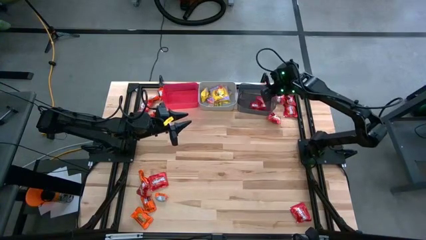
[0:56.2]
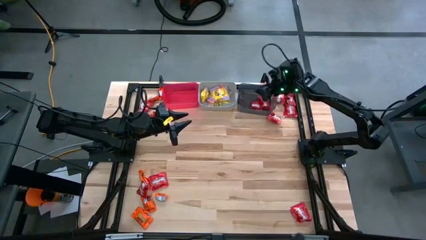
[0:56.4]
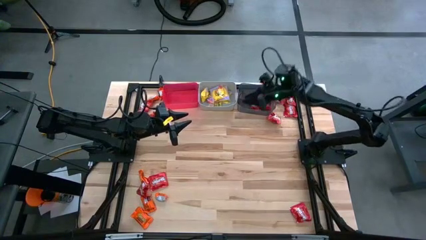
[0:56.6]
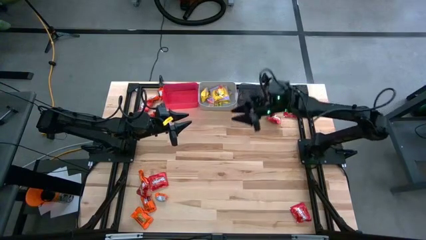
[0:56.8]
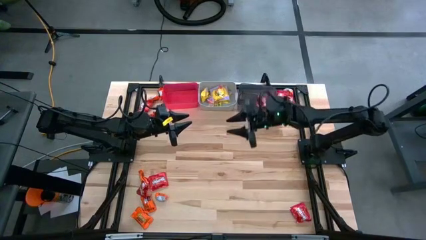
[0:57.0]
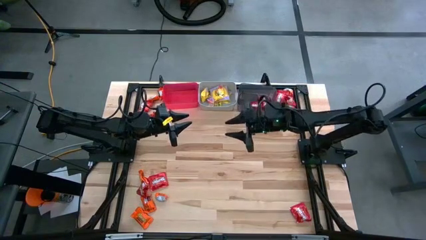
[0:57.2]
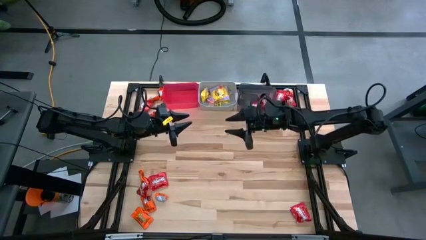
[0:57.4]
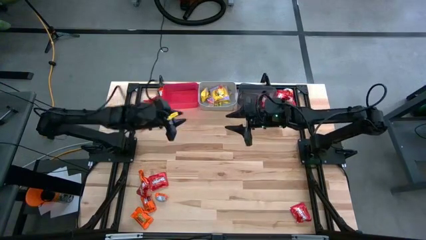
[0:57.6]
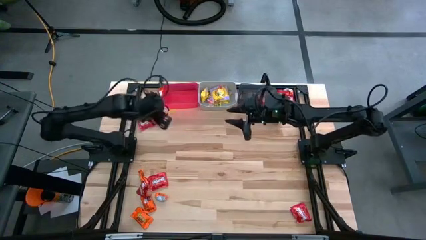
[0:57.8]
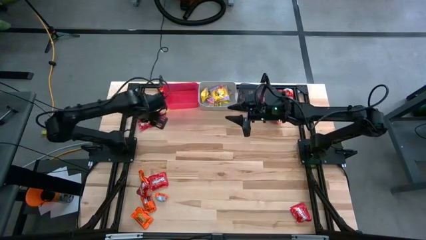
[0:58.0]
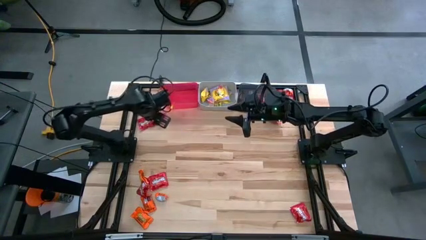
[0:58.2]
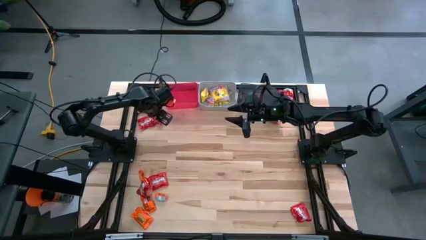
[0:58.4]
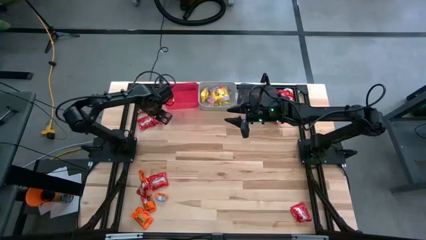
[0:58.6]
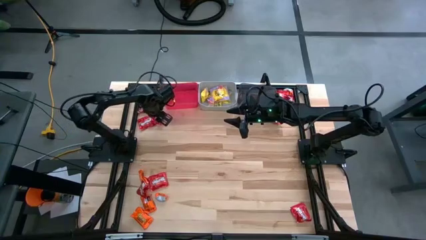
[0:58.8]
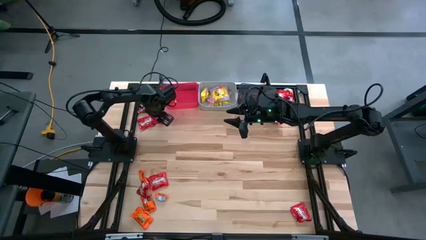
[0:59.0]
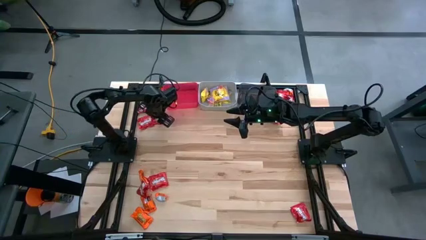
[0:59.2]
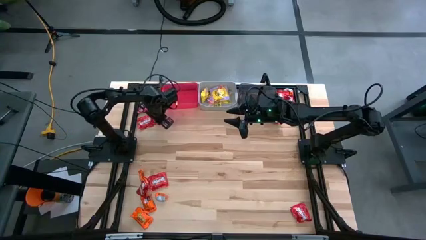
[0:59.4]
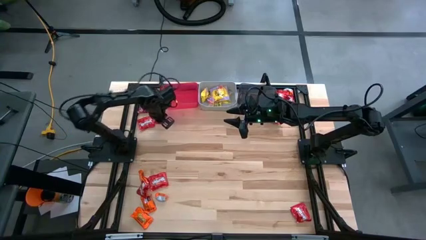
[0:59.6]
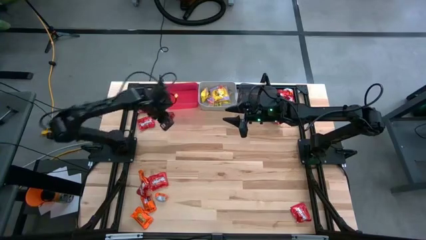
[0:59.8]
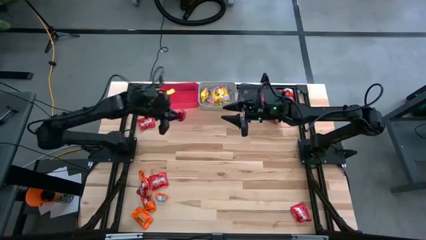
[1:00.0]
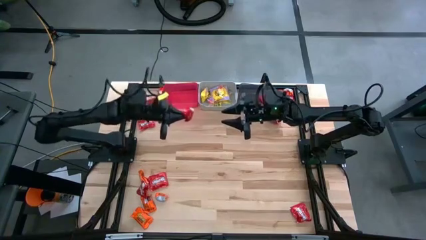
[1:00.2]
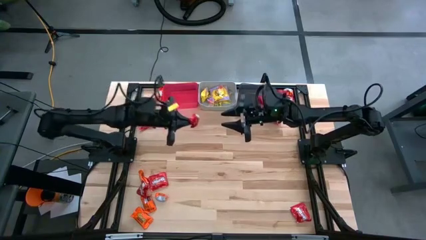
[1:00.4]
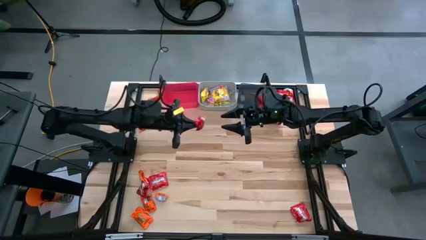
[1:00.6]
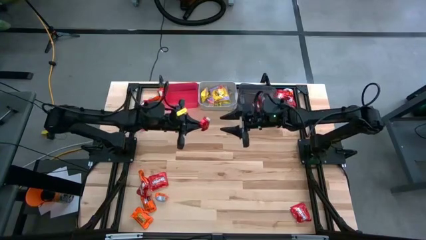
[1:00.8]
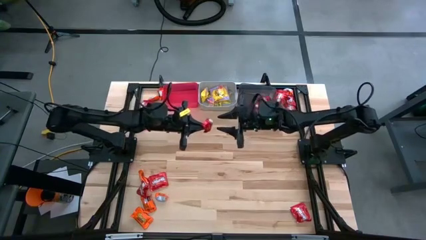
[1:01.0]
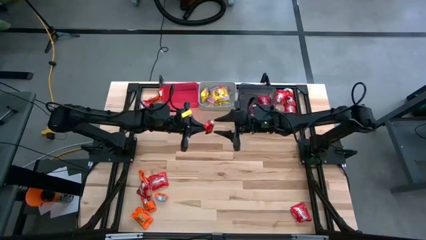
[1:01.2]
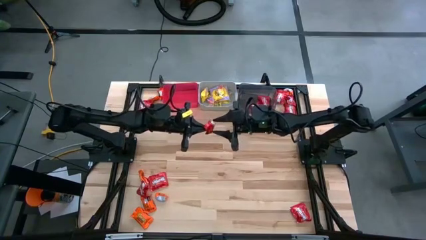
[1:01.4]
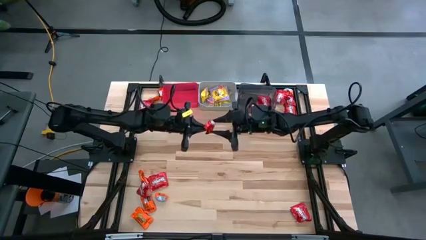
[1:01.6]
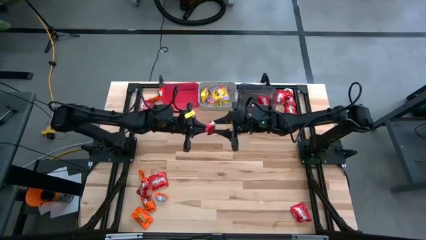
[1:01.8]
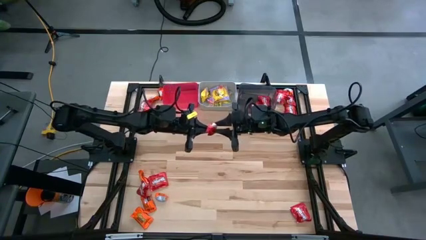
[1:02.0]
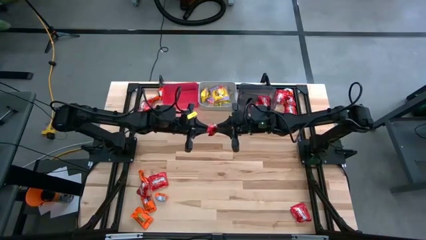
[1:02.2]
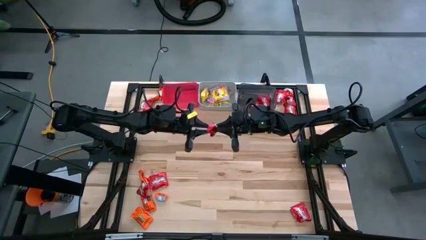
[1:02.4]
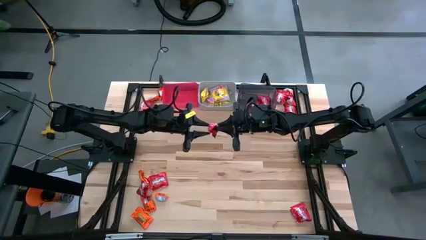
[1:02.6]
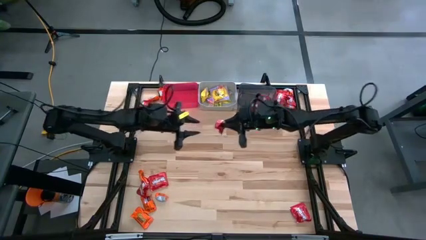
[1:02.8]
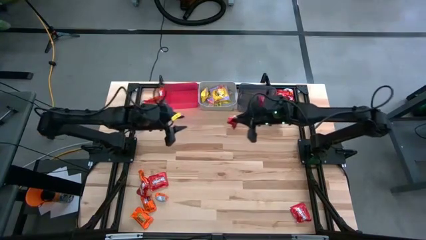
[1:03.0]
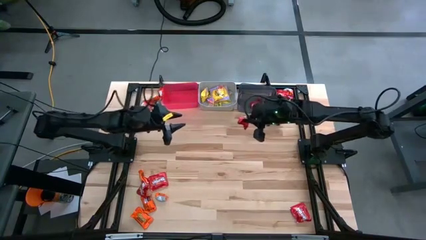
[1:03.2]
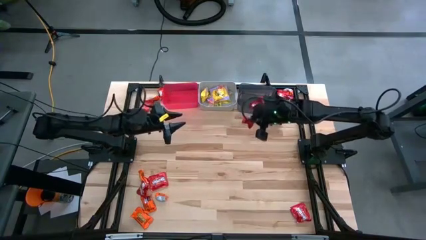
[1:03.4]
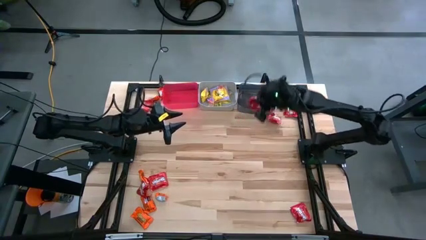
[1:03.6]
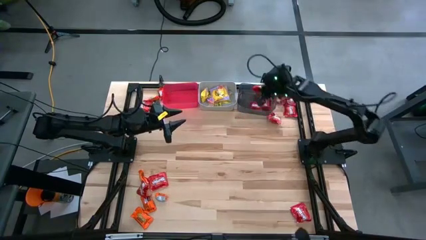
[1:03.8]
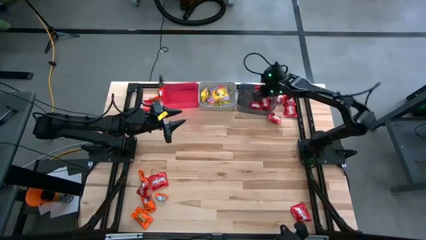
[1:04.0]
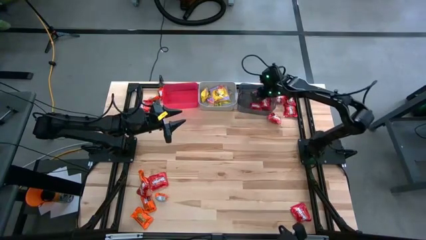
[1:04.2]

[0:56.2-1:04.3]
Task: Sort candy
Put the red candy into the black bin

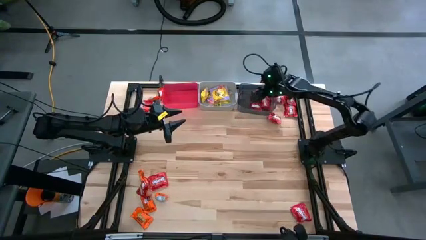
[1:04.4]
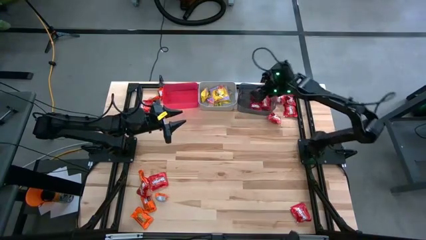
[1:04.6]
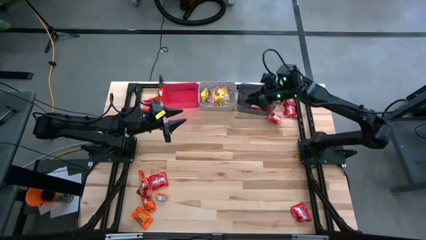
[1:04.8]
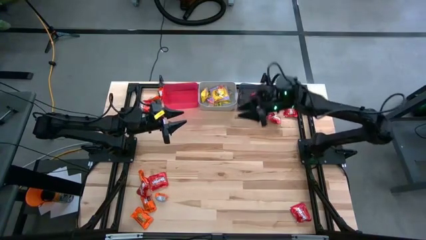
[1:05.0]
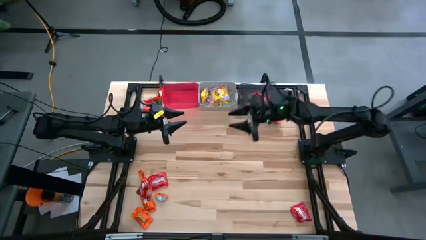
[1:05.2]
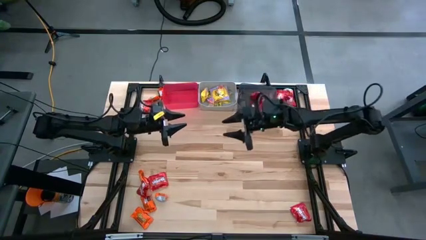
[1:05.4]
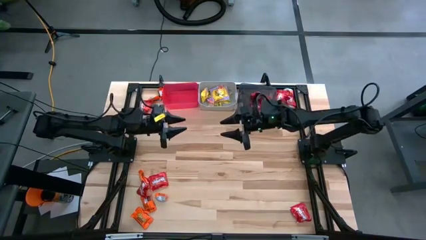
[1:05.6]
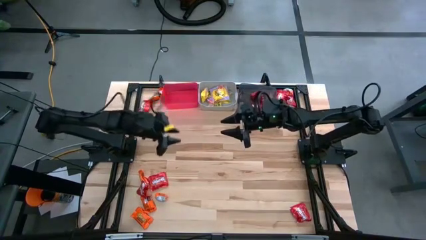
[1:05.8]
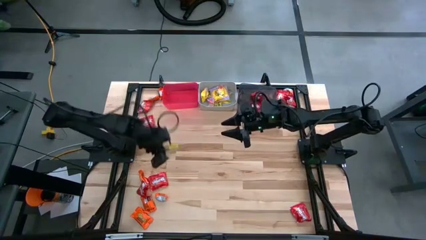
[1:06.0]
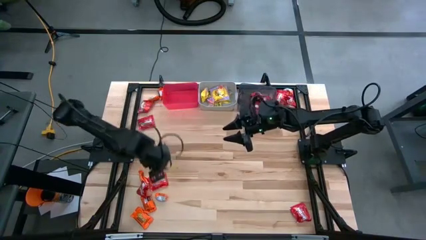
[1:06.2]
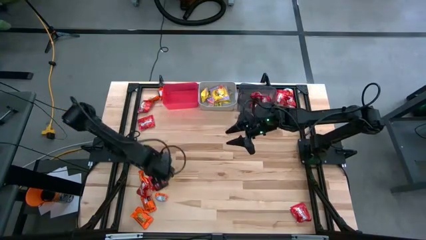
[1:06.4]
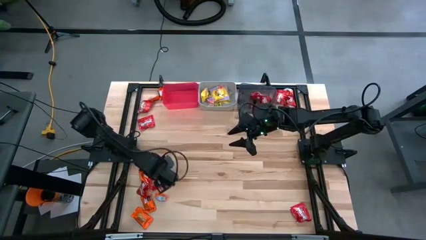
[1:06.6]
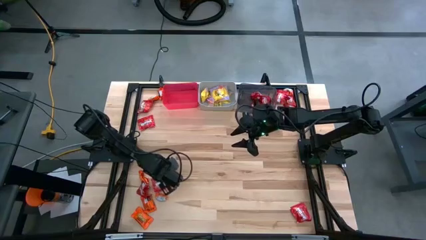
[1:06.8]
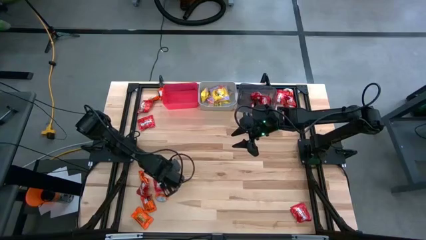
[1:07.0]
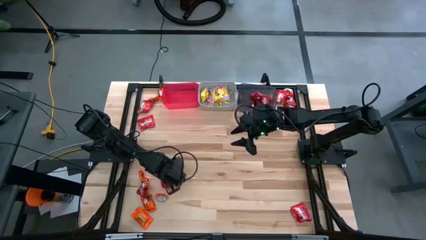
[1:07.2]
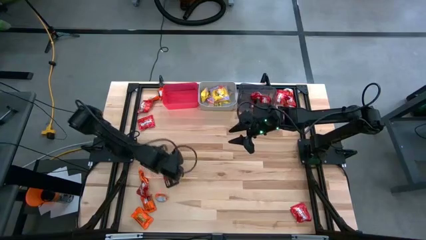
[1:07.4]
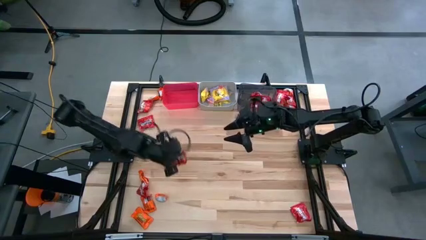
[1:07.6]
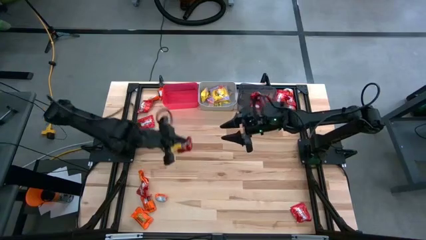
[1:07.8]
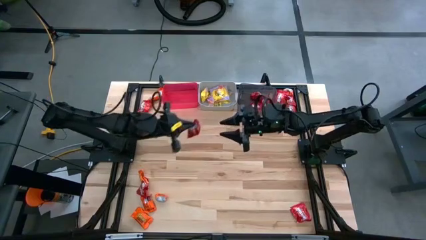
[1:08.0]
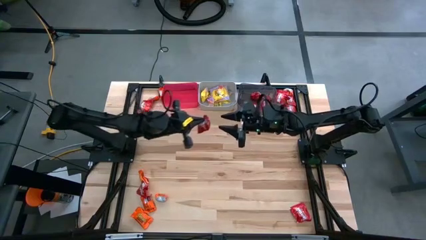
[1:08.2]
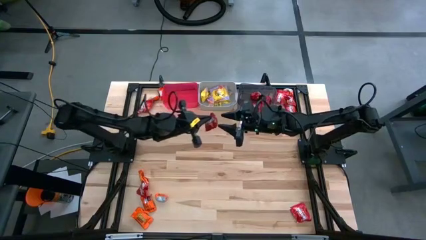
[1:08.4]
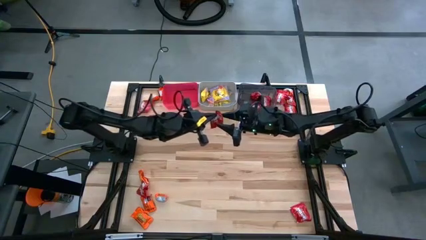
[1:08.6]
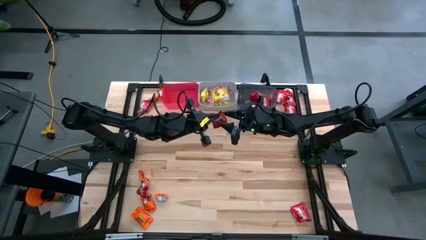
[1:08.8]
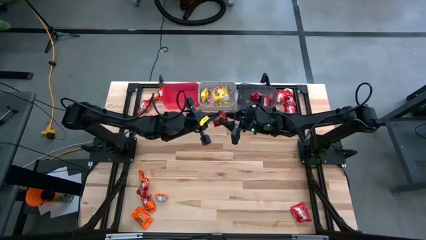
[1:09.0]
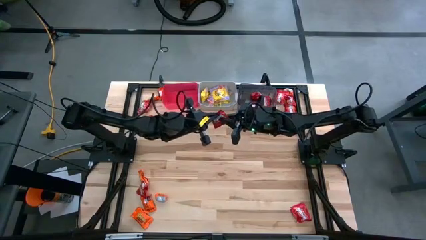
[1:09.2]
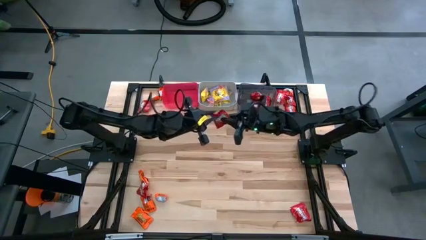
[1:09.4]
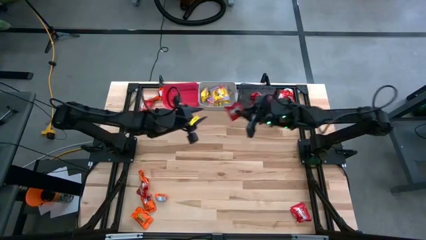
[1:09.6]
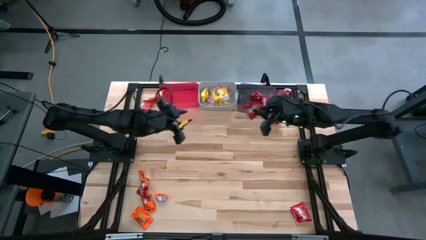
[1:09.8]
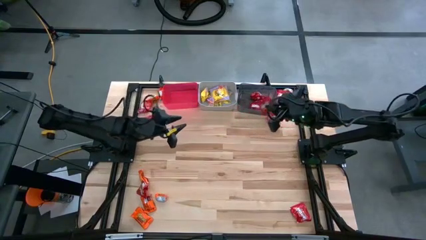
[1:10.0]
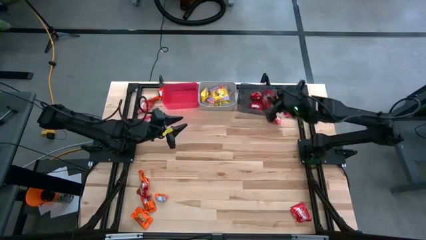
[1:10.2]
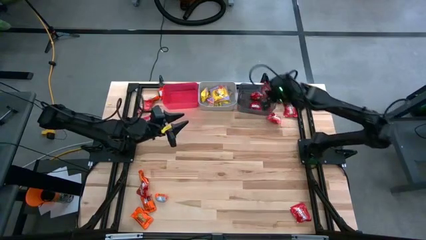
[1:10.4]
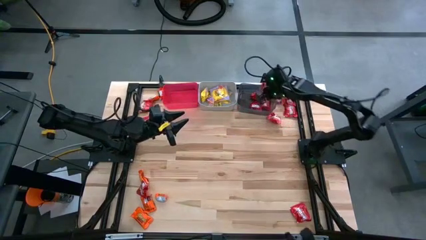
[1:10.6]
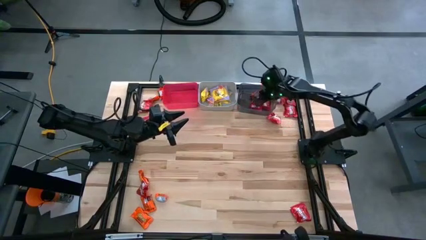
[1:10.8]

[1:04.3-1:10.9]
Put the red candy into the black bin

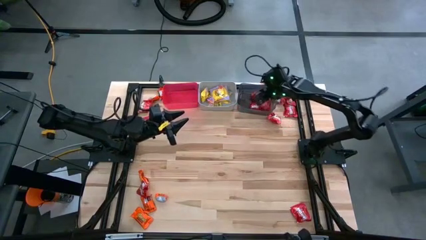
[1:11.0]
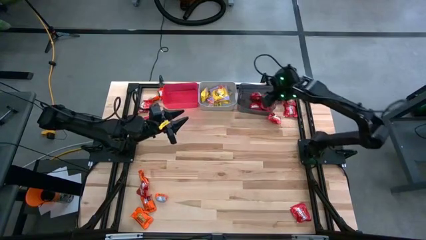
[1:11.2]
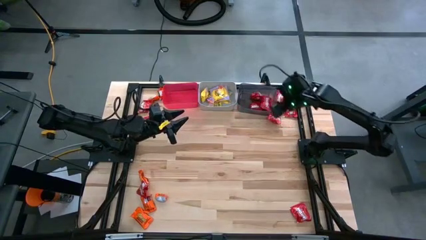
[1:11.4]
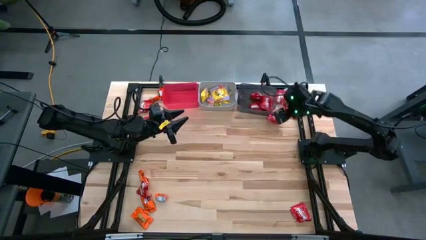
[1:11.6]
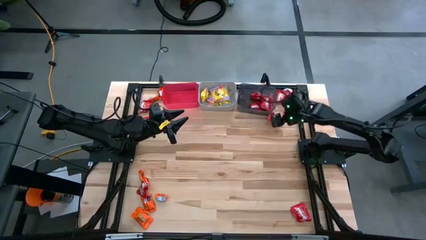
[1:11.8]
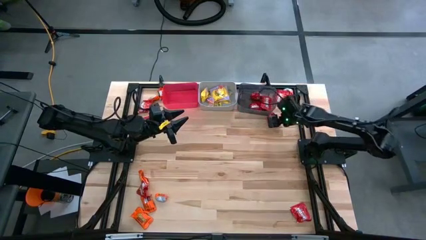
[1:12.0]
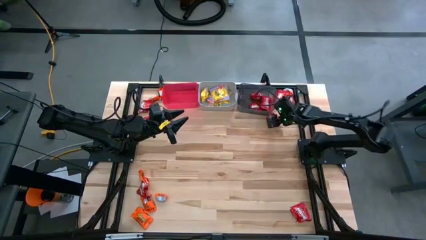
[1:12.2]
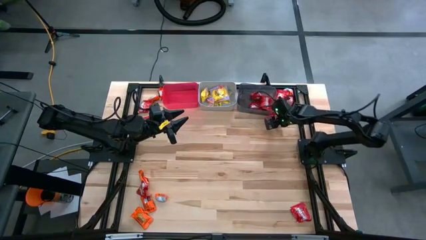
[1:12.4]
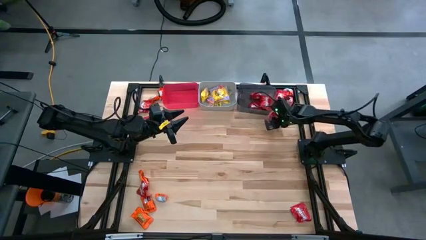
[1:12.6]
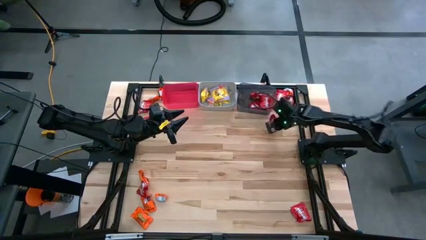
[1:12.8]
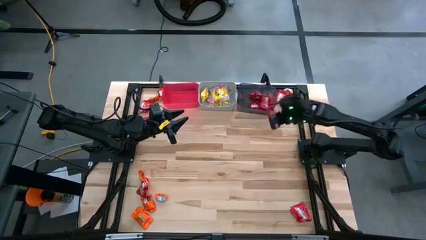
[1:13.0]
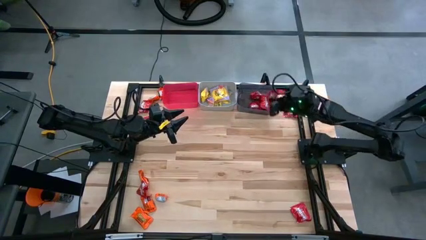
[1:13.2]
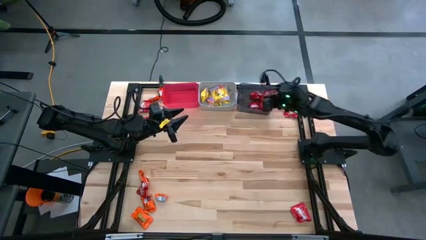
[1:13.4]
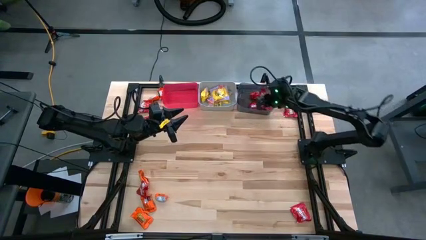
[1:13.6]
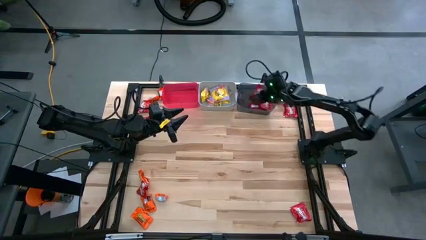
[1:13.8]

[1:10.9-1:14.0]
Put the red candy into the black bin
